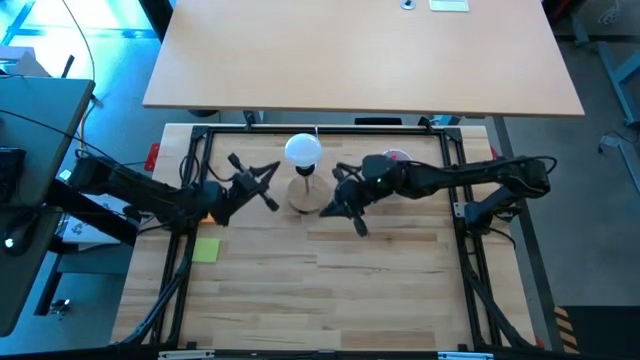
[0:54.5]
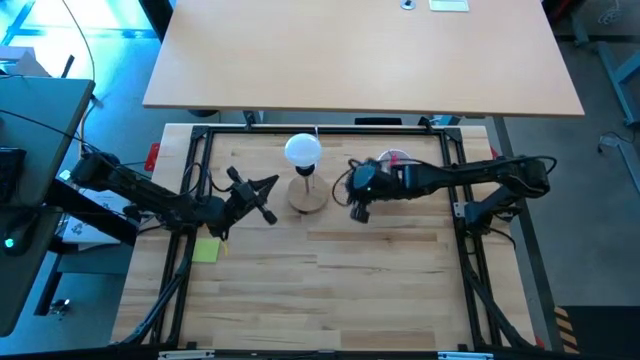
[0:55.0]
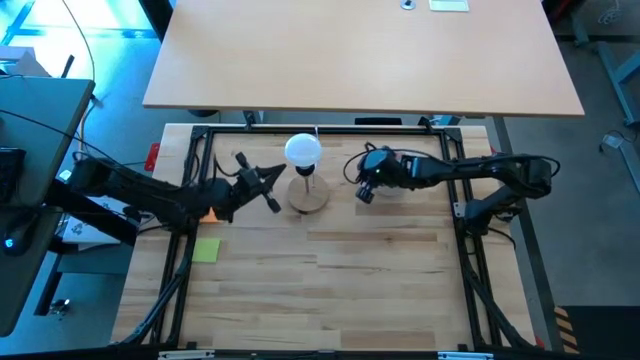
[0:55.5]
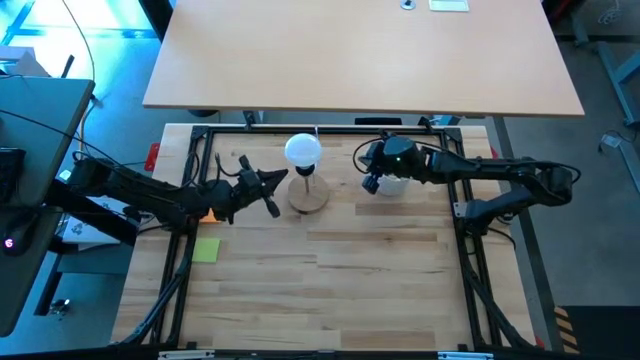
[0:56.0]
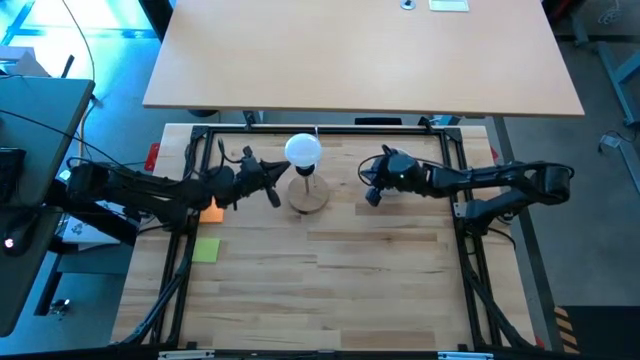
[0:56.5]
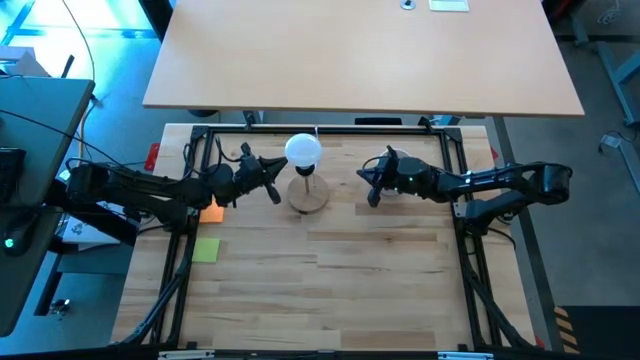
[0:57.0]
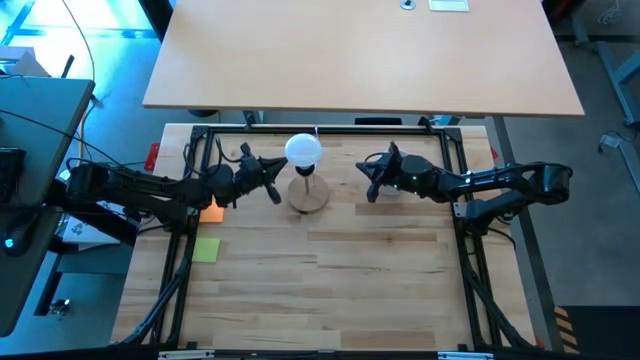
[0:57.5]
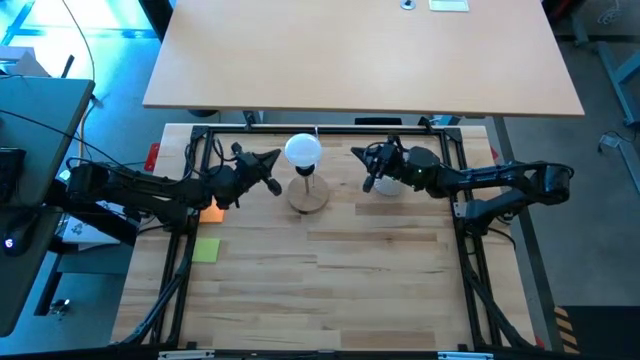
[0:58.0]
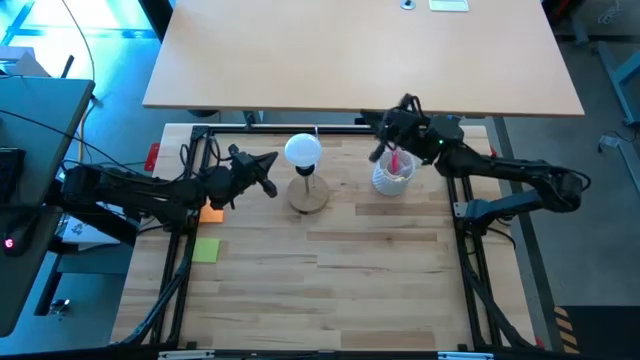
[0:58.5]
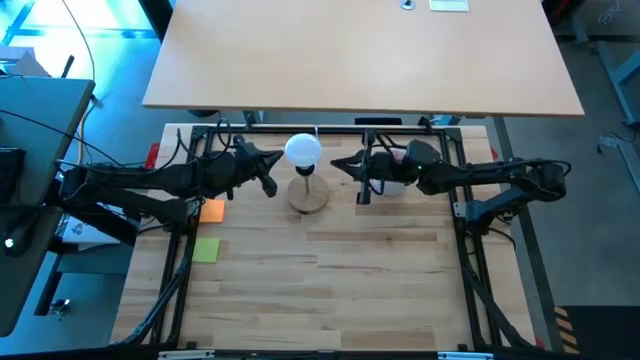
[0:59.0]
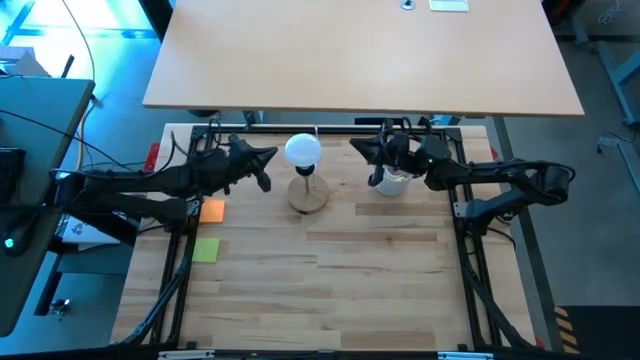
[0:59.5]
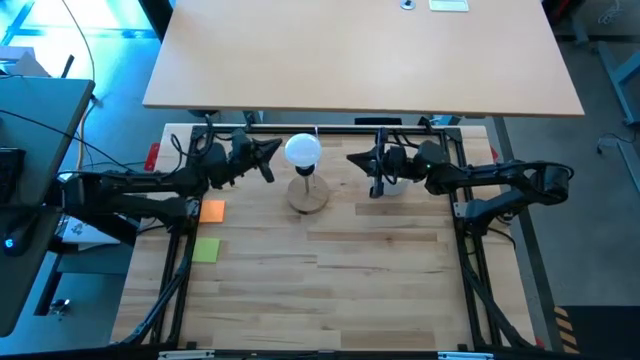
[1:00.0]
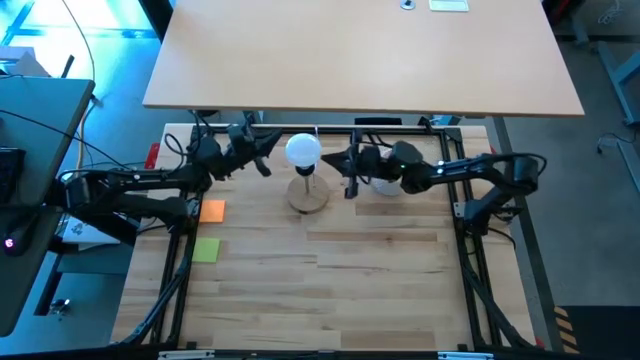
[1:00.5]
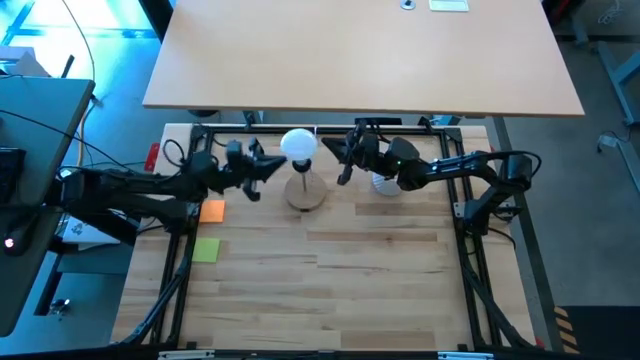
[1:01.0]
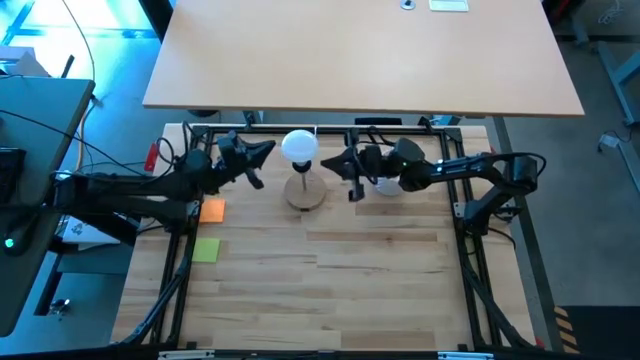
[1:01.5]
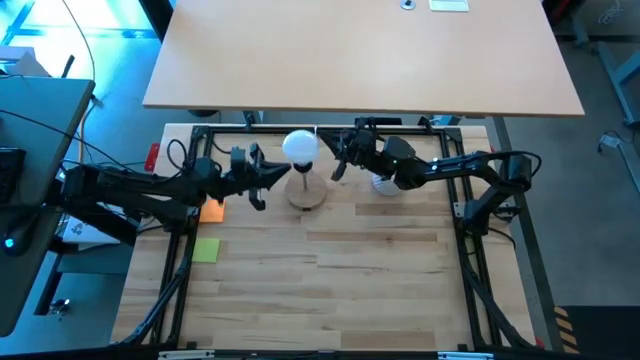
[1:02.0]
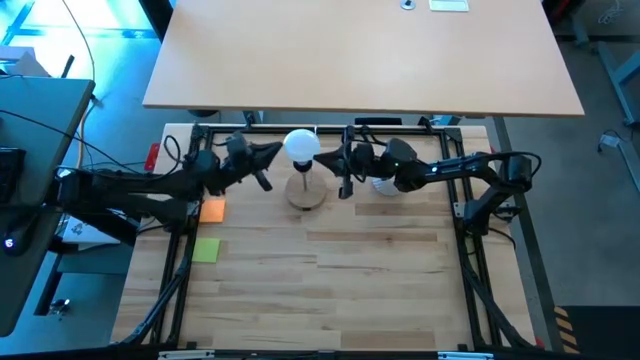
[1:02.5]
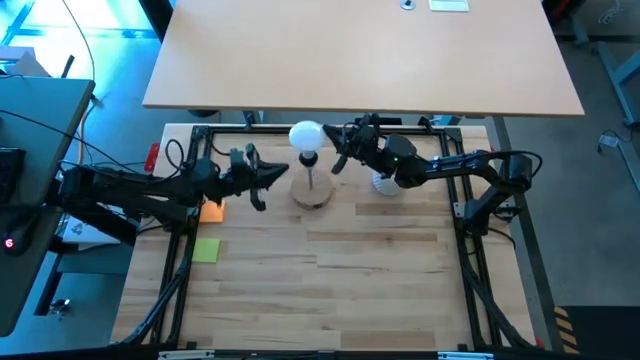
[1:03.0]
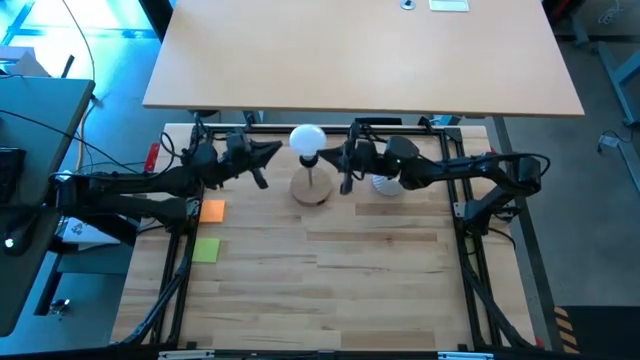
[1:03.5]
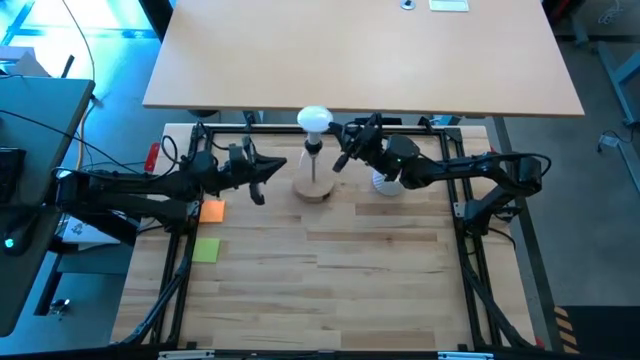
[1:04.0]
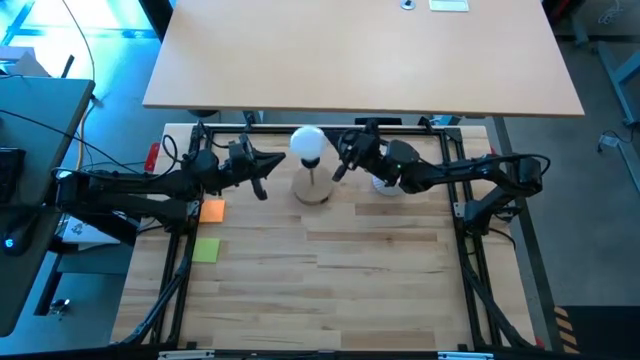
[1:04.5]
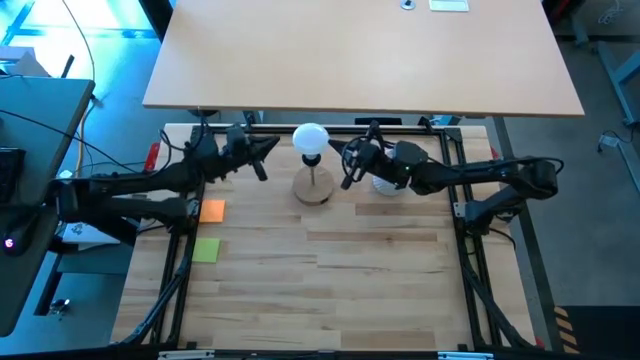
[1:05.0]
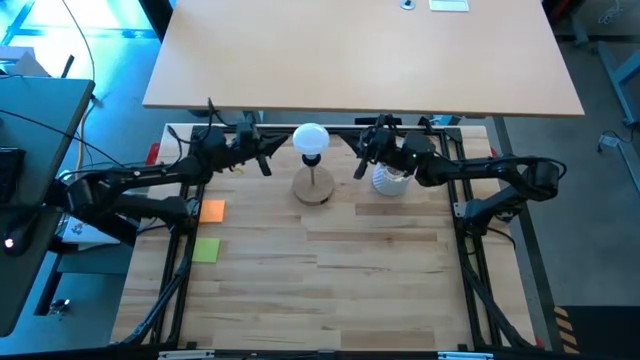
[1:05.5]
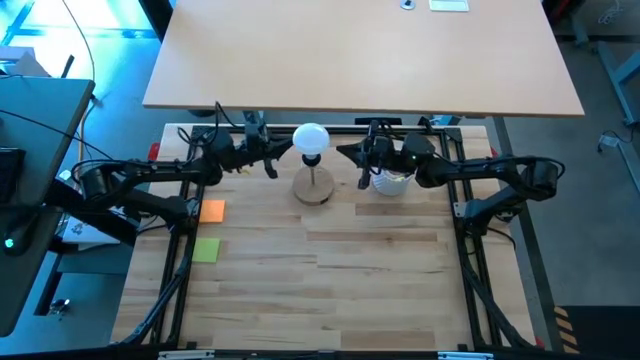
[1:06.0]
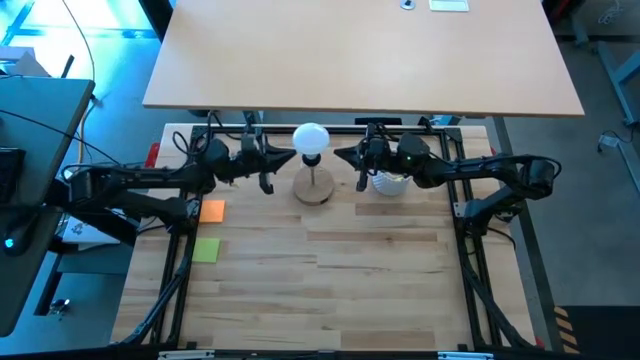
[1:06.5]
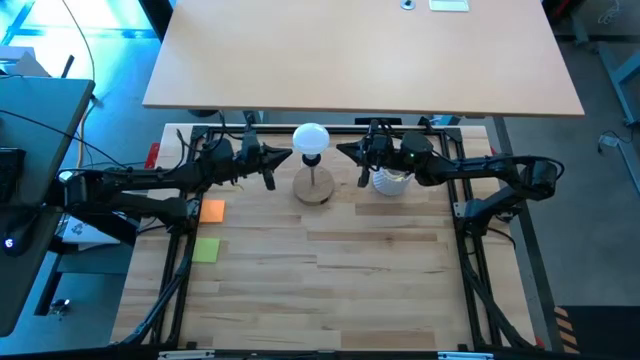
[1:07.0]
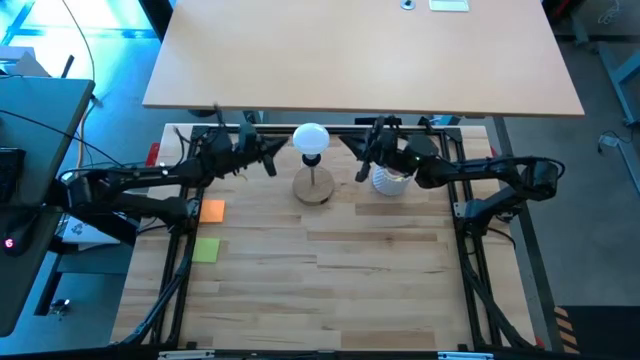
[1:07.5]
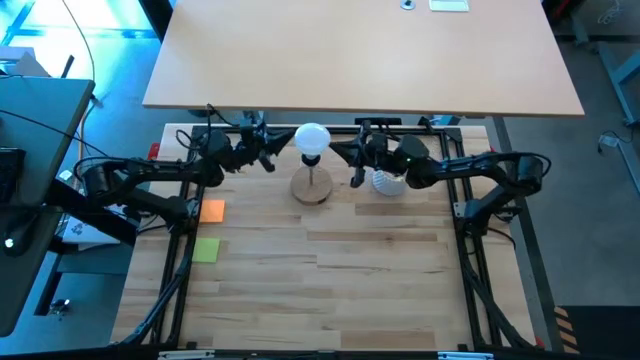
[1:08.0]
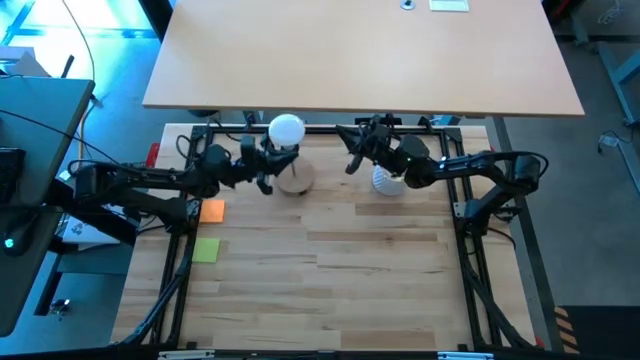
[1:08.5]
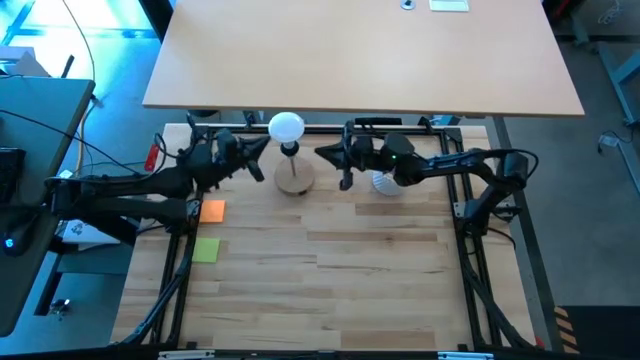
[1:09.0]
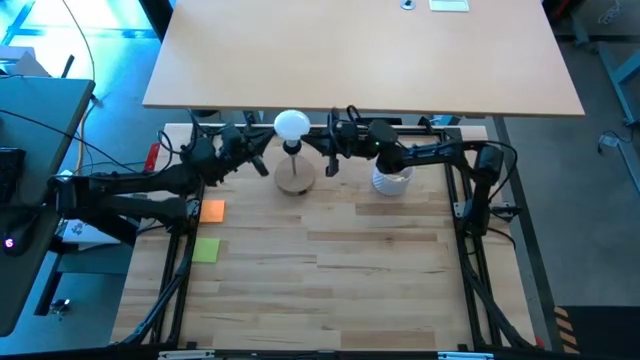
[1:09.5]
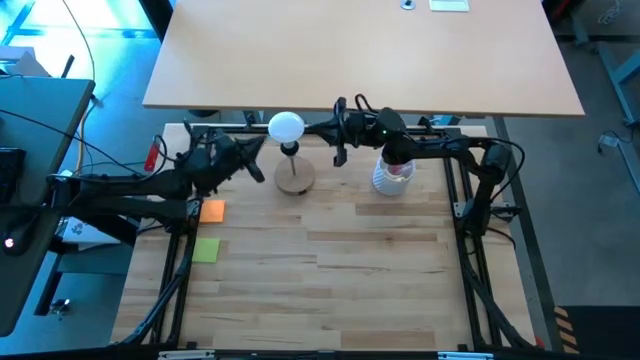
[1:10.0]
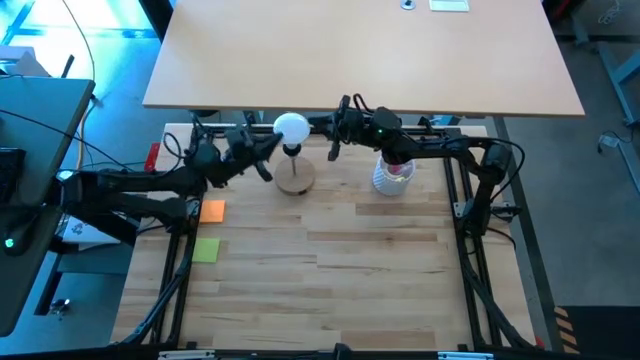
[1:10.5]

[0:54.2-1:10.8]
Task: Screw lightbulb
Remove the lightbulb from the lamp
